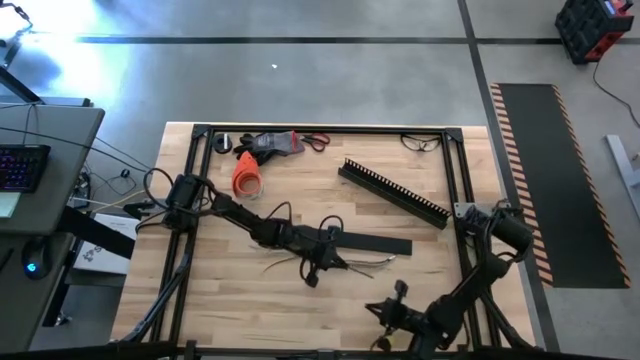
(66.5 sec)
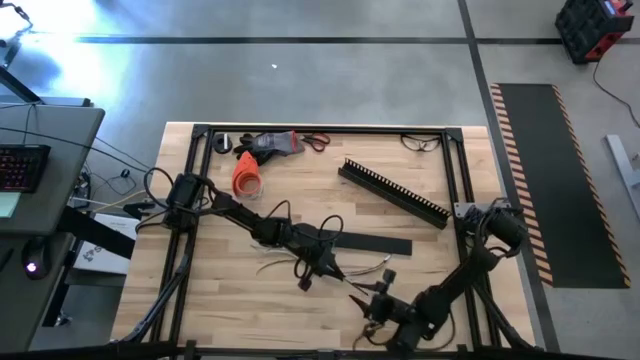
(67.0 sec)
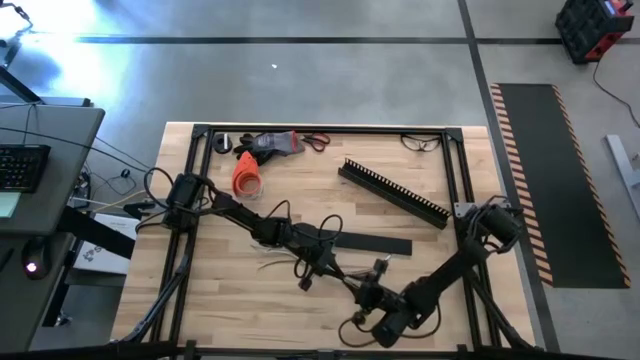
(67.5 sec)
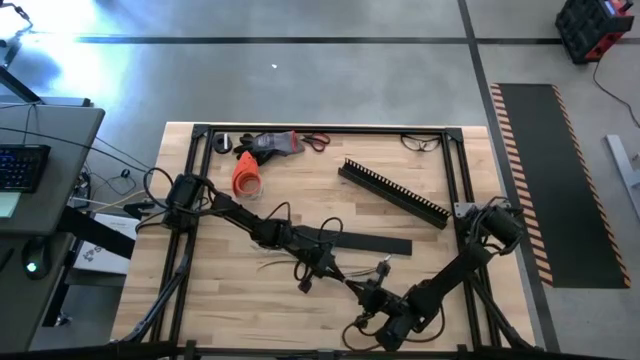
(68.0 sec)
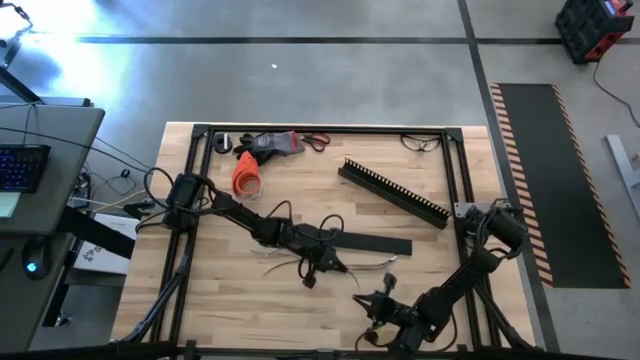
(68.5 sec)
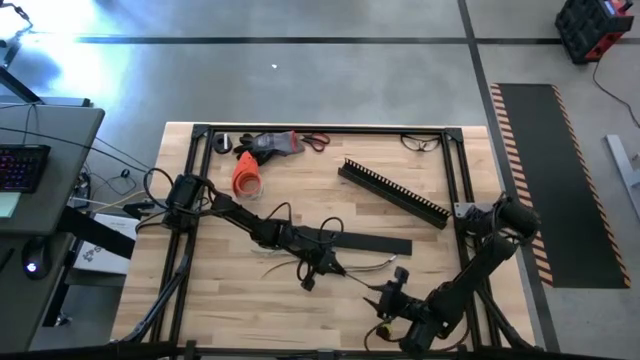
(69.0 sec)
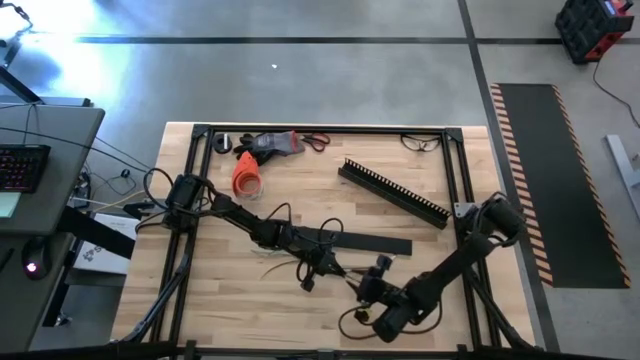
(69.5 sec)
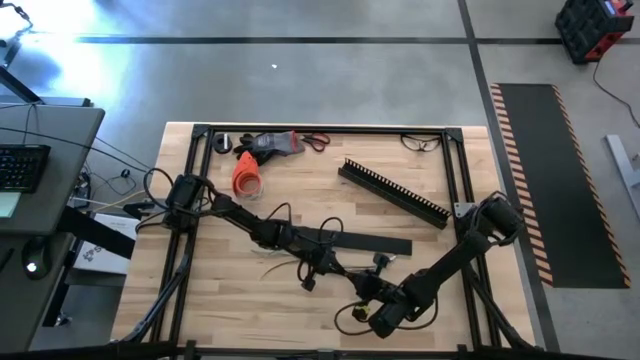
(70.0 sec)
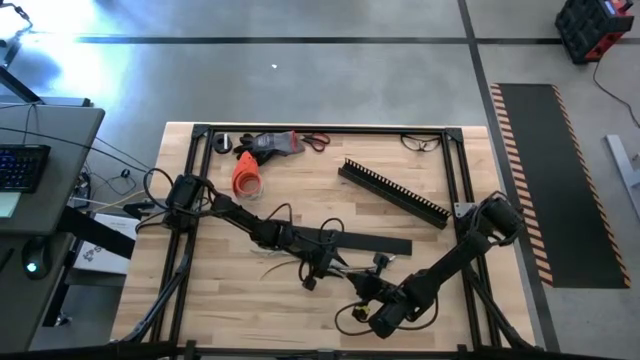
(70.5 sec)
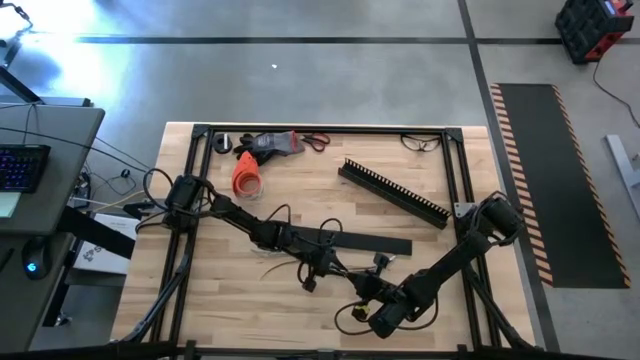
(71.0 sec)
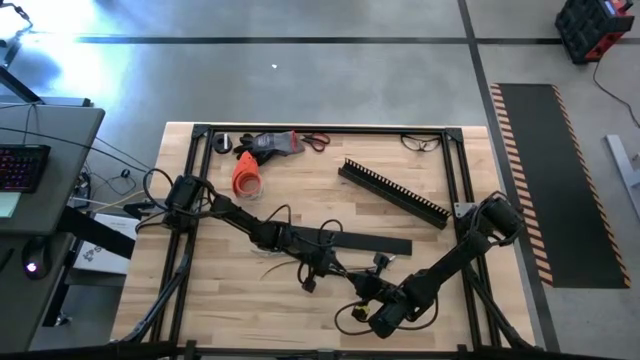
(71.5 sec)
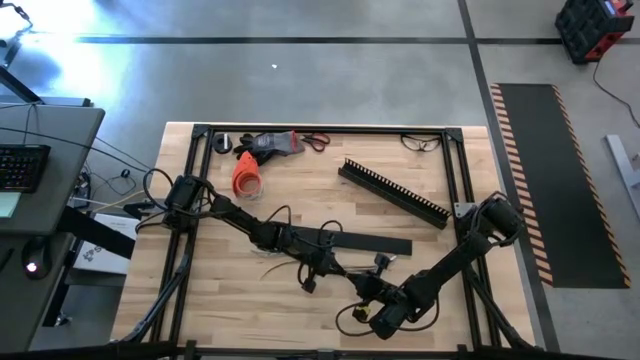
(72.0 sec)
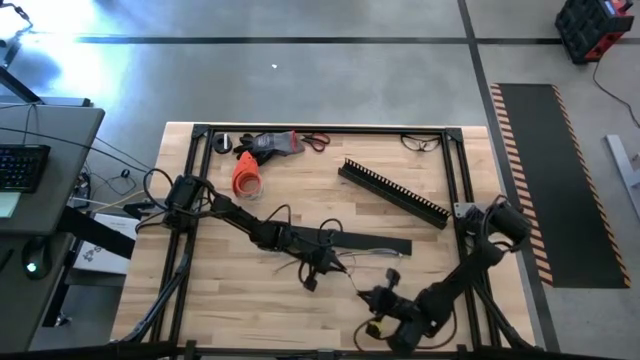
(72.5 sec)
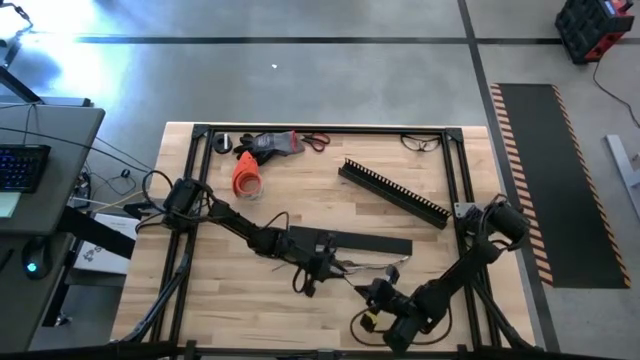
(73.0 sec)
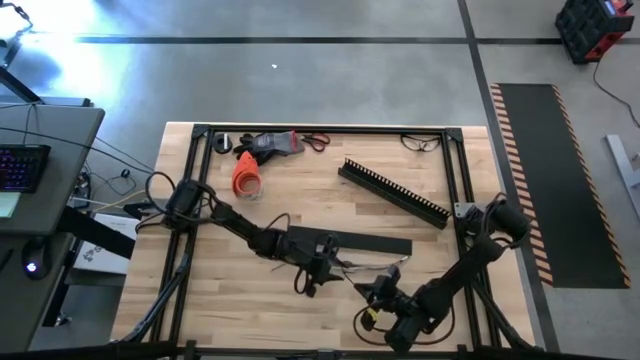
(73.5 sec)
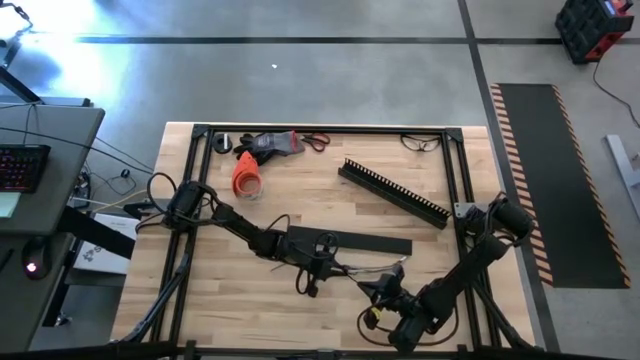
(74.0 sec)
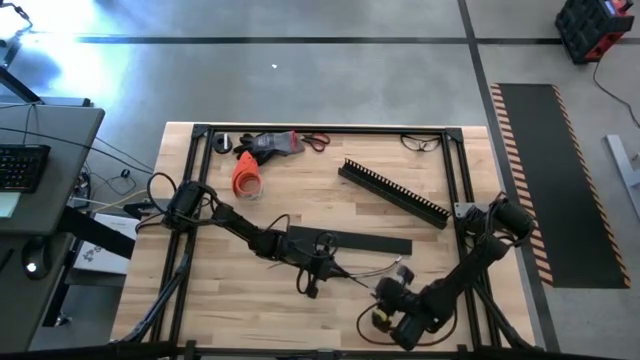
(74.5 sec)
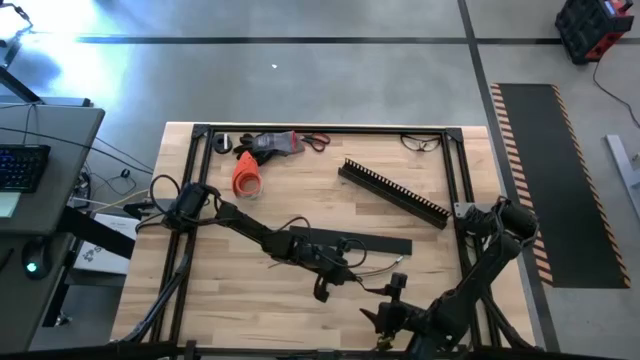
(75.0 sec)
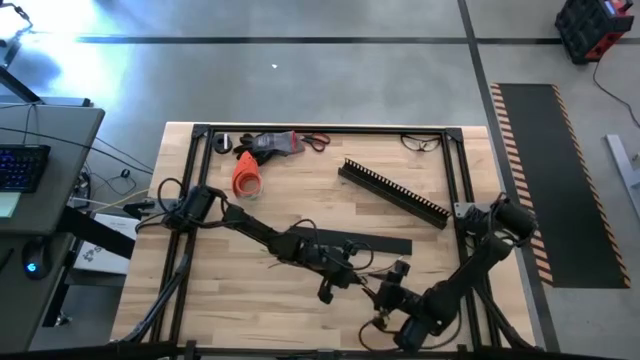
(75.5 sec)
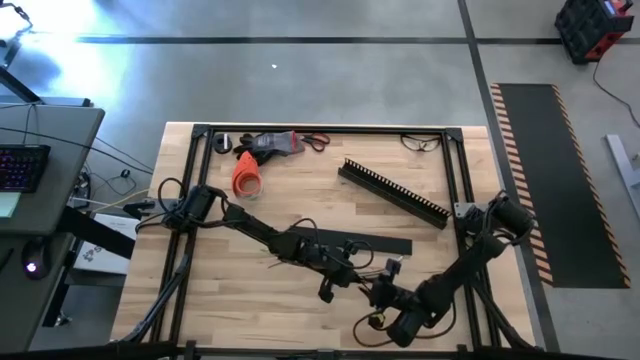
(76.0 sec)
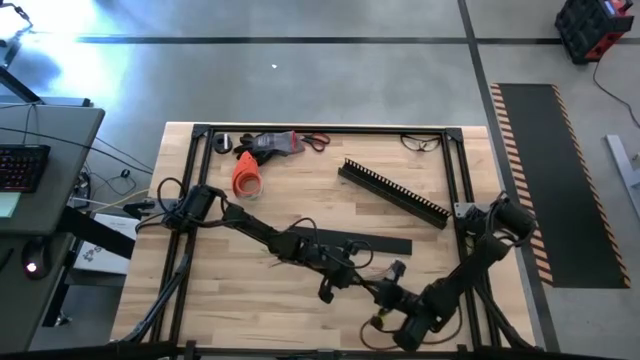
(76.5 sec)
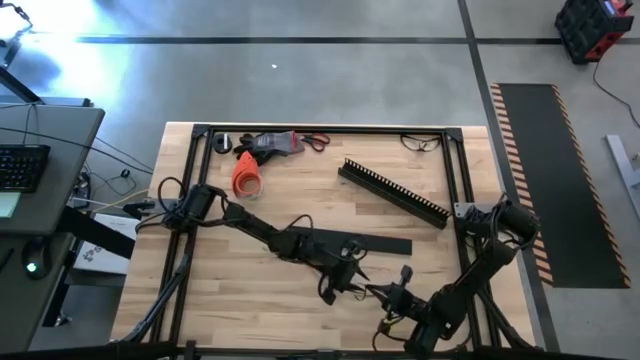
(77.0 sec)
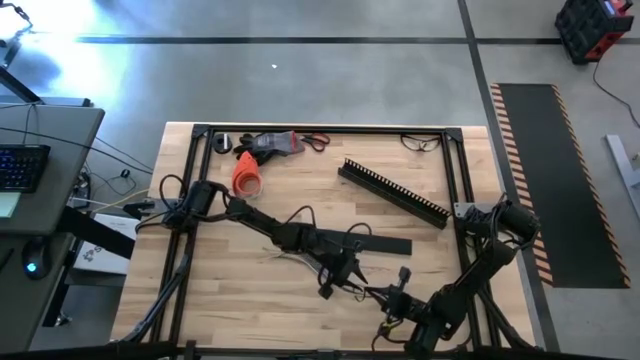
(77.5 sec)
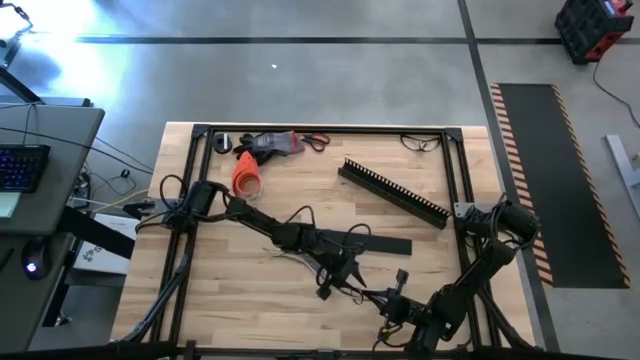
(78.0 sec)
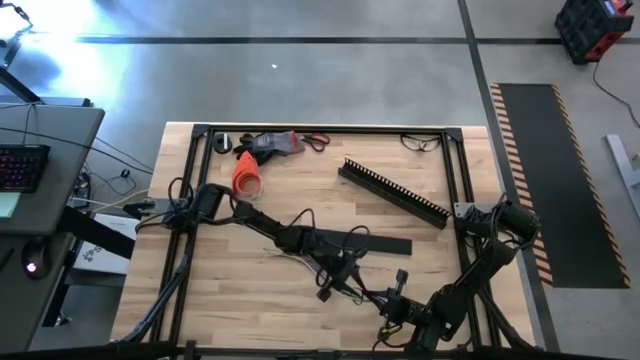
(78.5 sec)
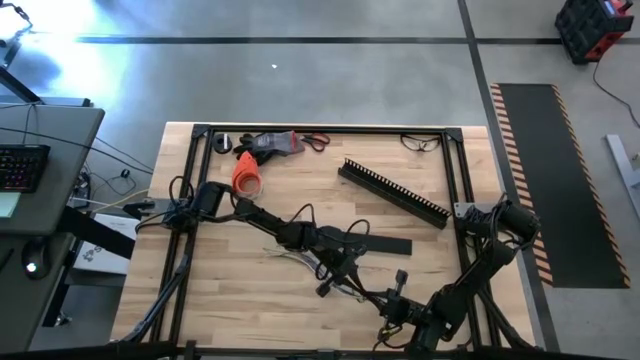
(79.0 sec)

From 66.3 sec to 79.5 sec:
Task: Ziptie cables
Wrap the colored cables with the black zip tie

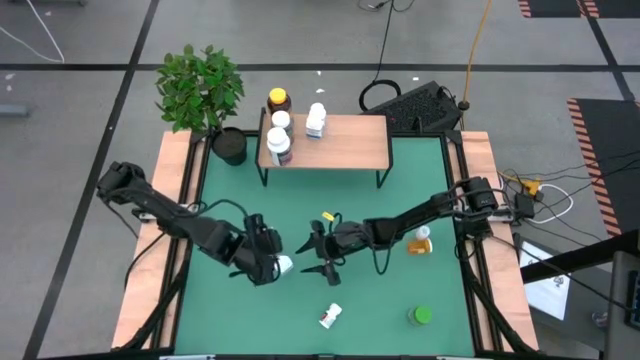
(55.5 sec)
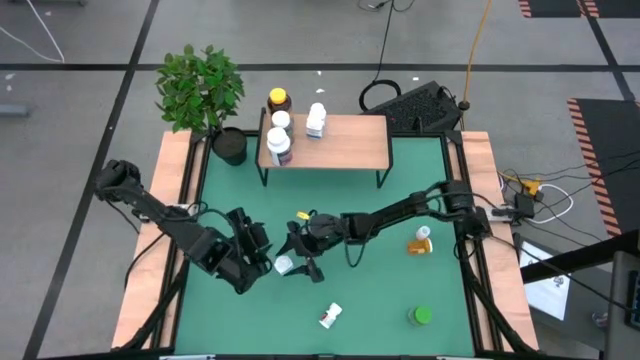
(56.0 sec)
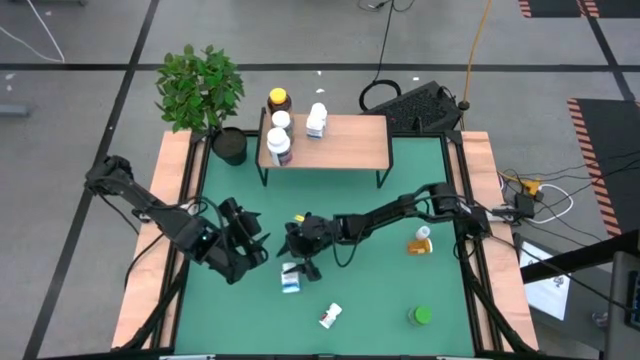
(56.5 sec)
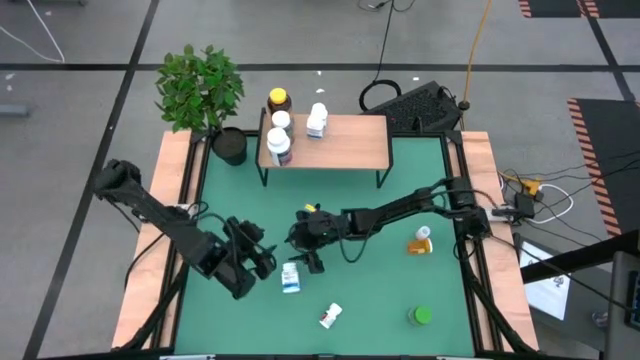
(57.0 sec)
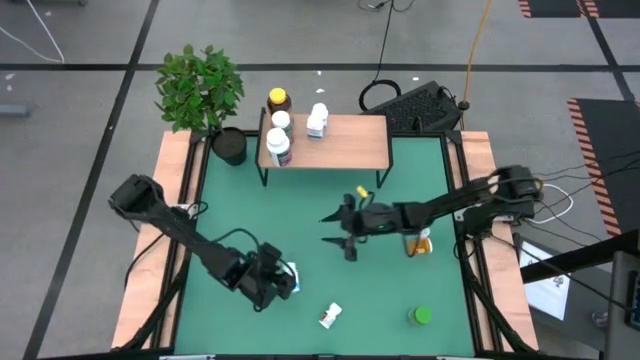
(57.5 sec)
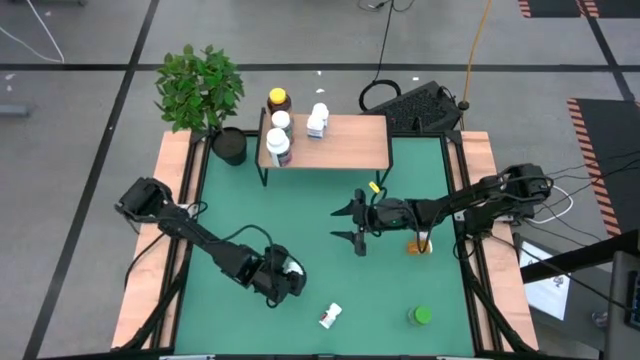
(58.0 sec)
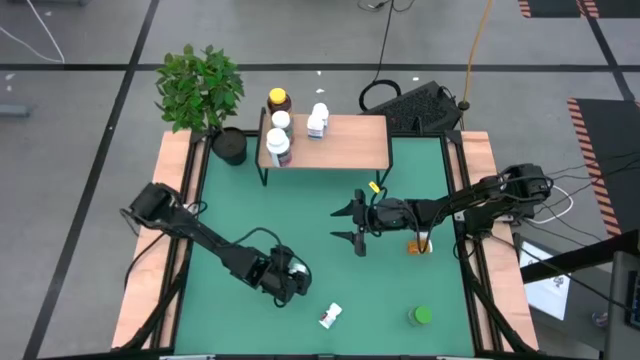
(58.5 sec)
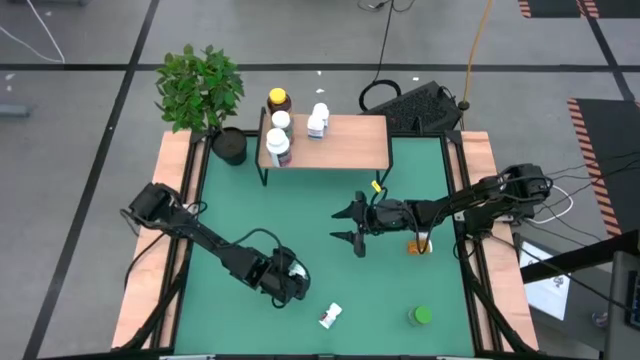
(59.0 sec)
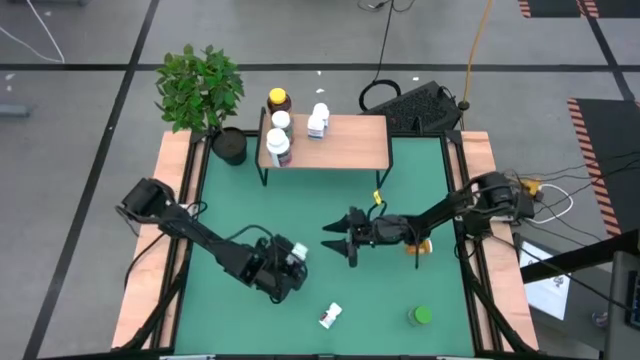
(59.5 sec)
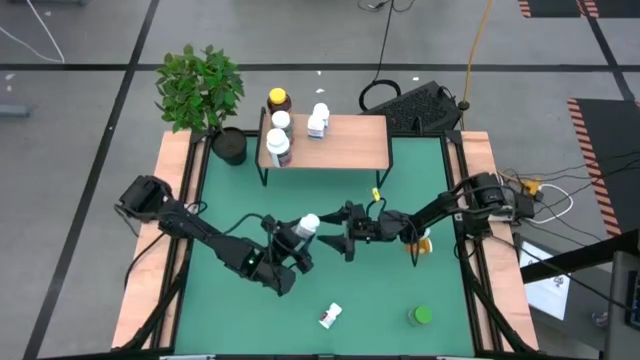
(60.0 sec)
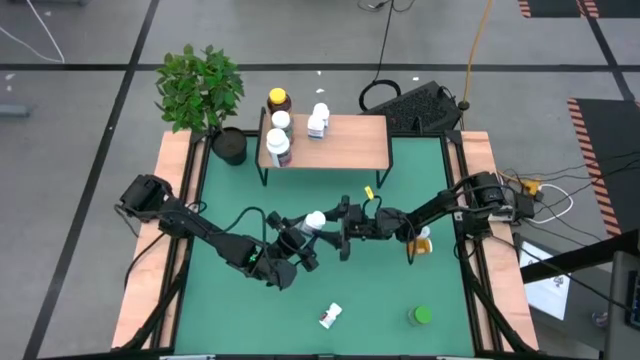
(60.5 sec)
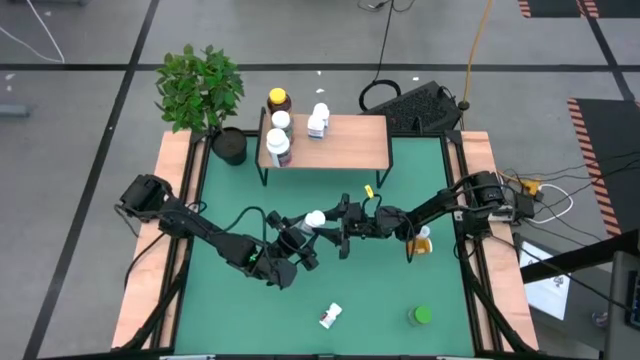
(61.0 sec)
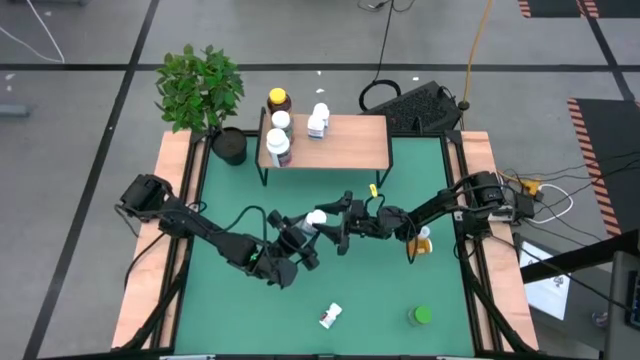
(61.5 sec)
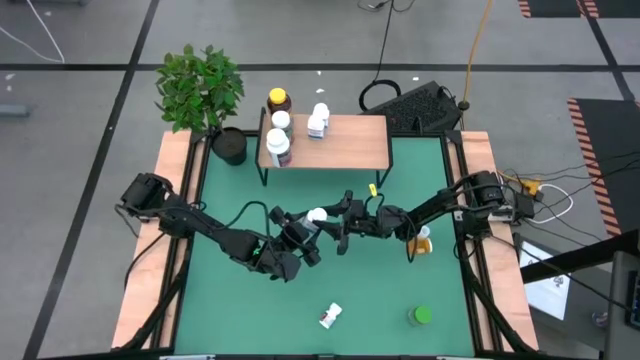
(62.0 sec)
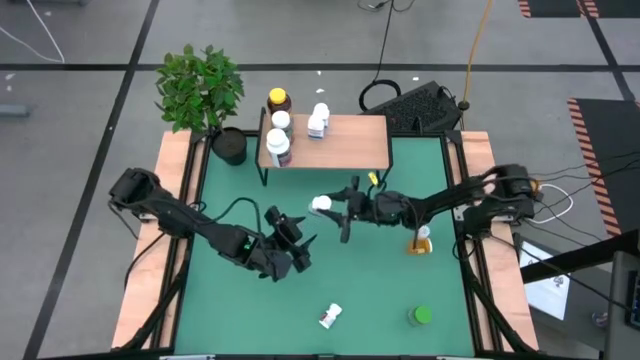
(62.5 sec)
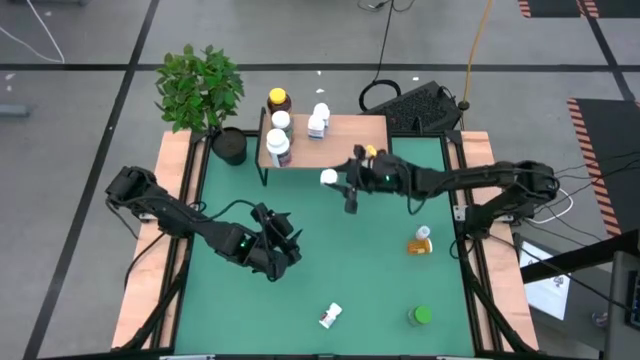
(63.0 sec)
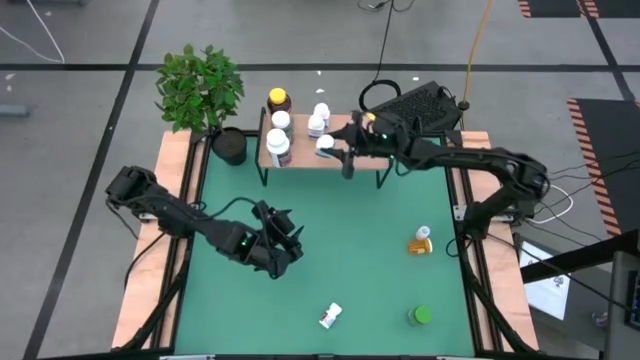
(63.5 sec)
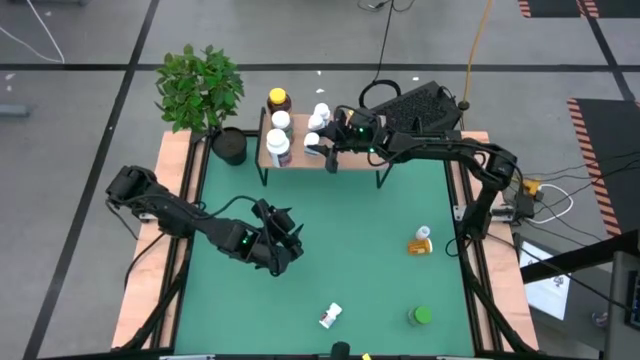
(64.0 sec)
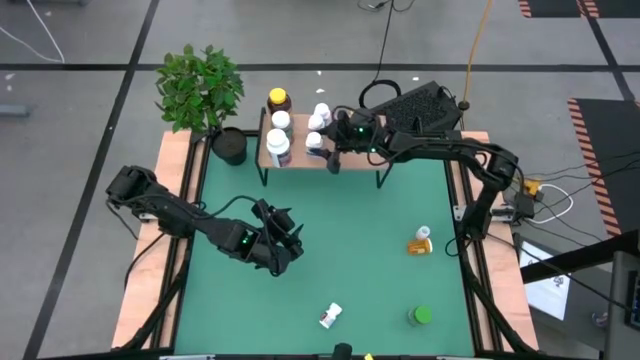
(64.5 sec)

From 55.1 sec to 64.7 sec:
Task: Pick and place medicine bottles onto shelf by color
Put the white and blue medicine bottle on the shelf
